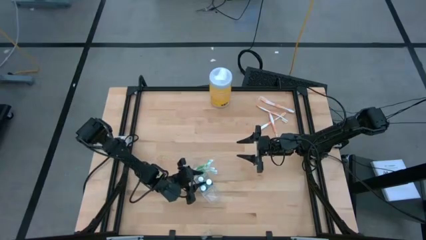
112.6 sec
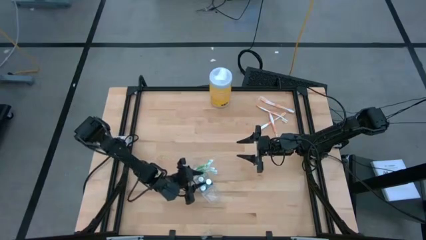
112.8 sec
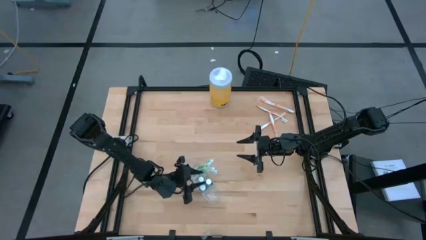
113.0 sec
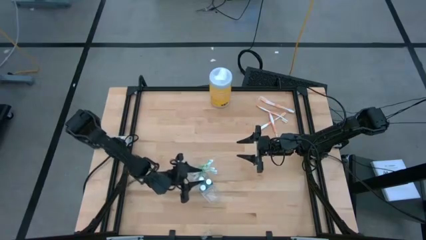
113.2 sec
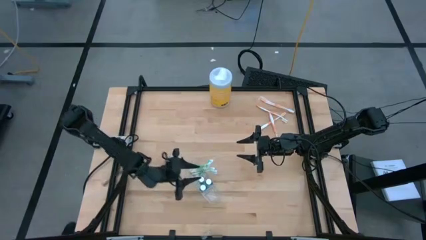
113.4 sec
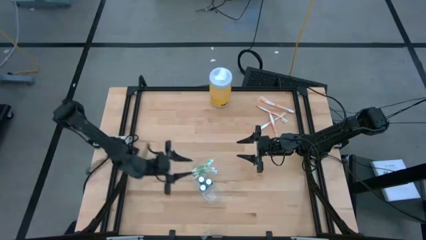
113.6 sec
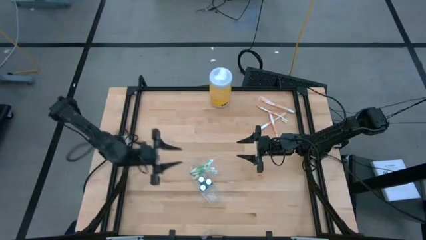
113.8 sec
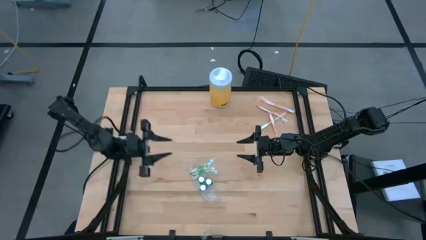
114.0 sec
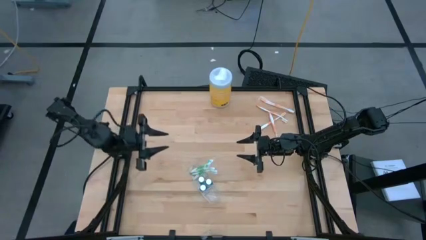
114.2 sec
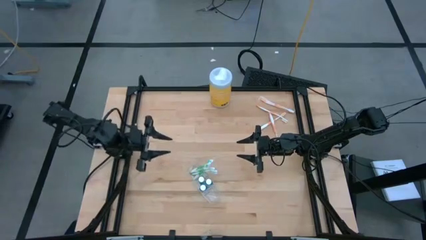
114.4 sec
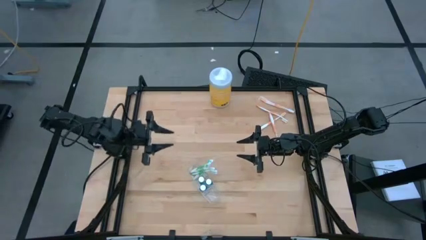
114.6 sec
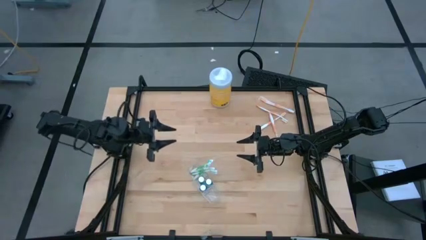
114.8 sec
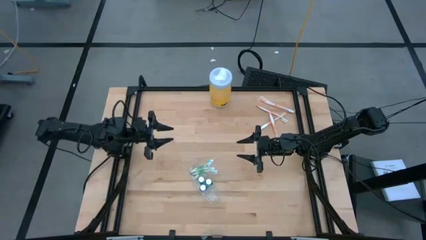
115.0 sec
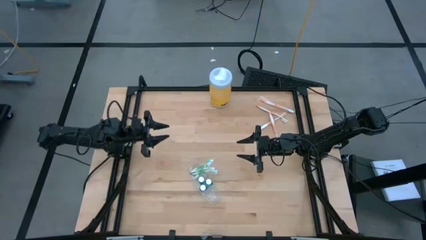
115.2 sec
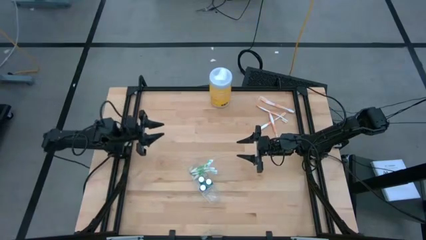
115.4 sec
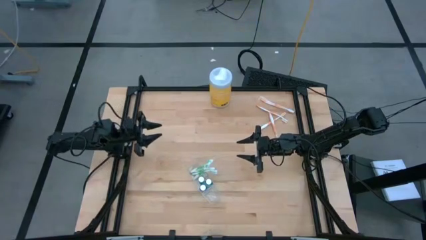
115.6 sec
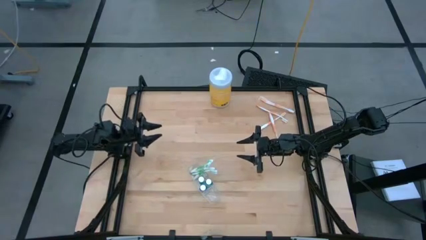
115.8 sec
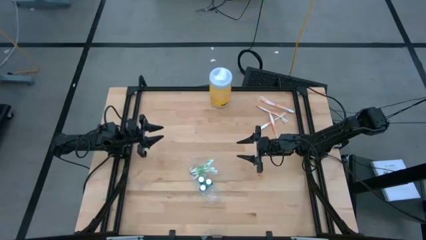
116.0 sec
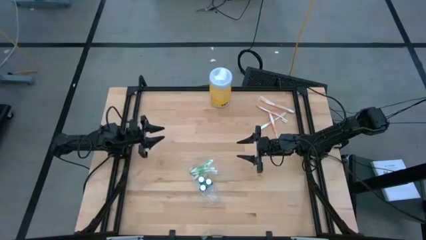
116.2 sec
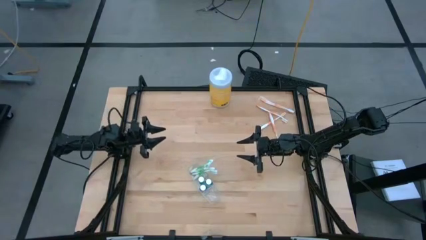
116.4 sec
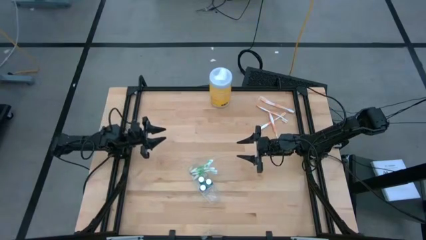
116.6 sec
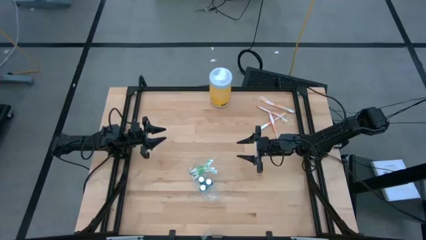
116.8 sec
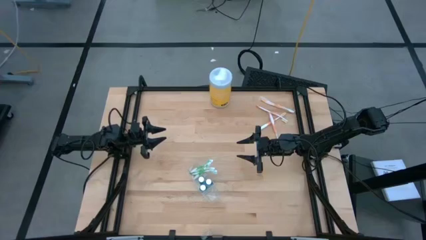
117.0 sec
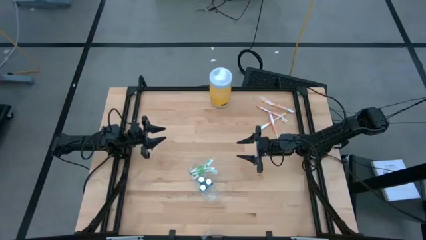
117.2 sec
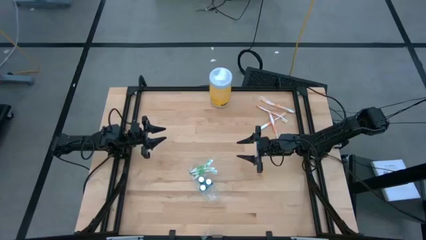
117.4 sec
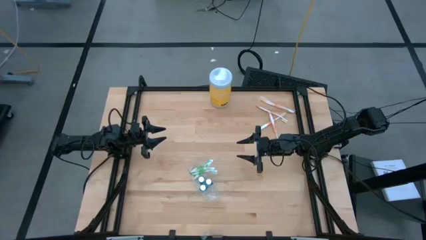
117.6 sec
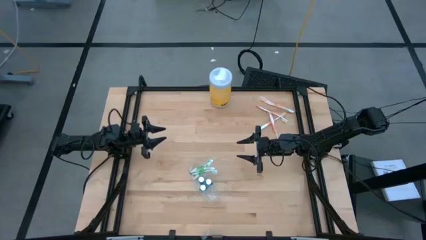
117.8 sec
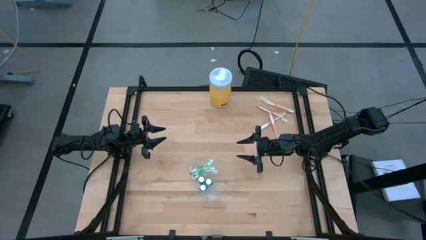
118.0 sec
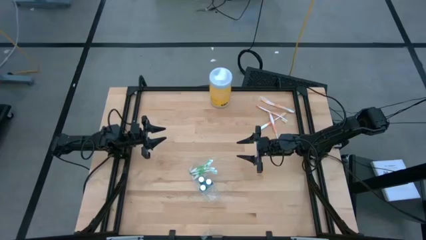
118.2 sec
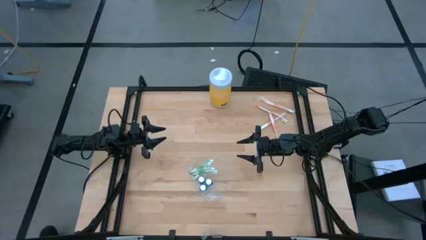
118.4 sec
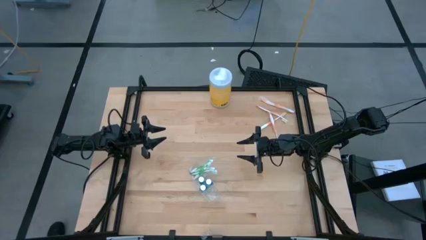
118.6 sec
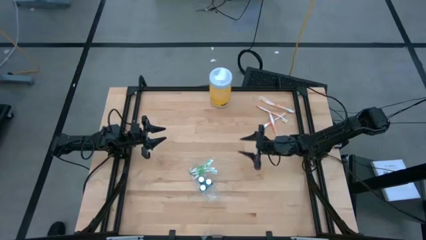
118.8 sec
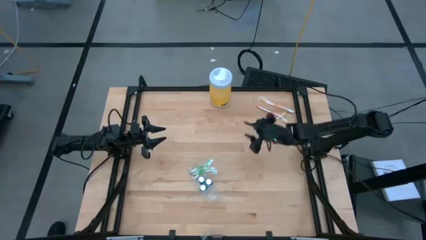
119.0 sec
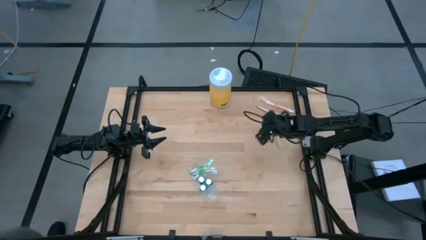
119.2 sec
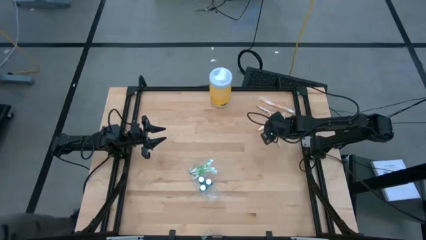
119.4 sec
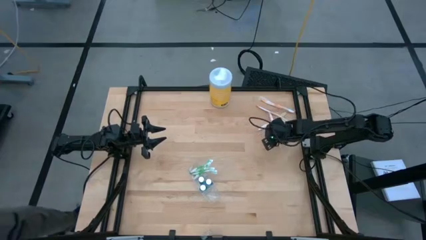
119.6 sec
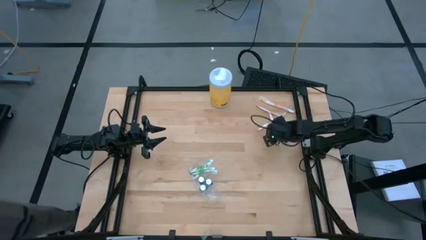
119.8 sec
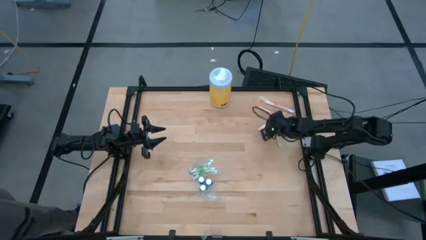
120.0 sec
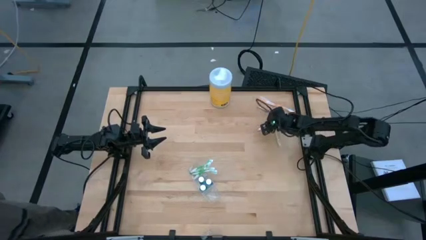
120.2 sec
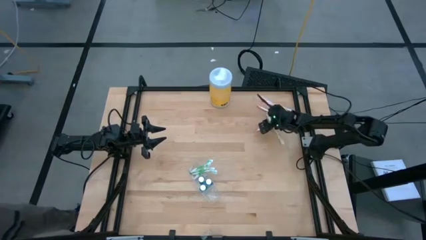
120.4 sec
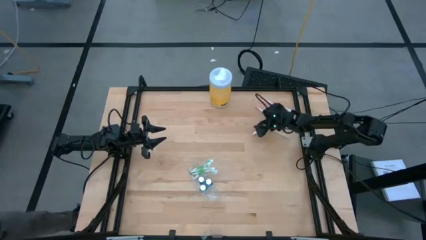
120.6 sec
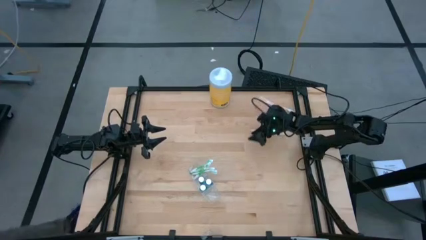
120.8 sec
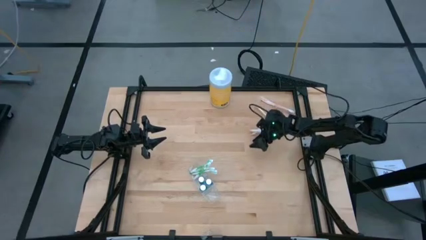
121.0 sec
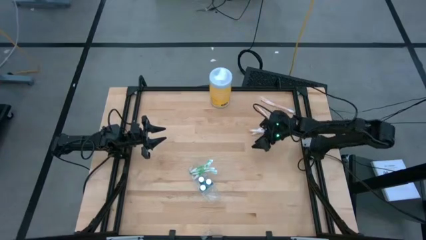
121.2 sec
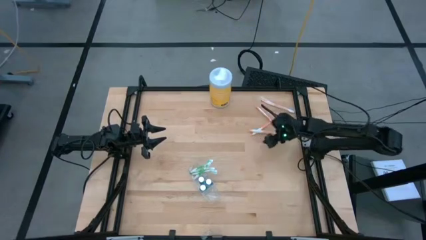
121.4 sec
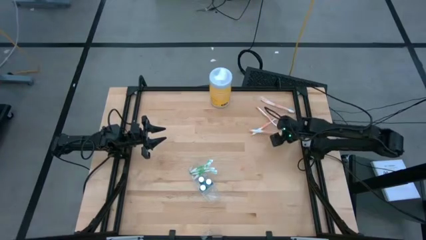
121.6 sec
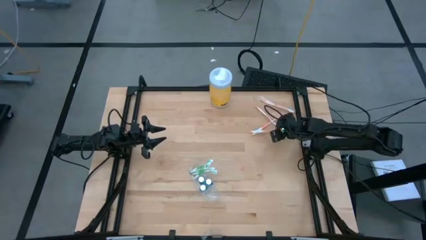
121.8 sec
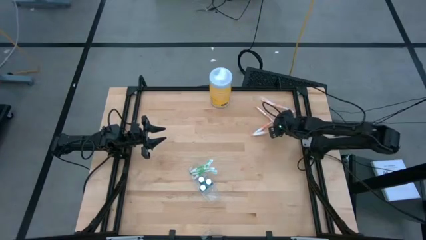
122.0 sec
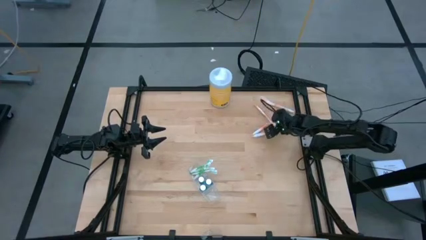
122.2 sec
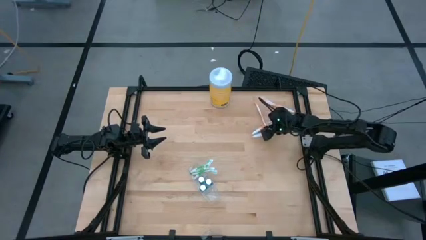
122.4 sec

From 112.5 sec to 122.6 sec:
Task: Pick & Place toothbrushing station
Put the orange toothbrush into the transparent organizer

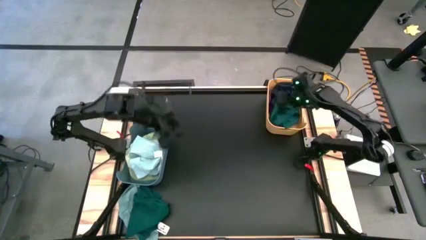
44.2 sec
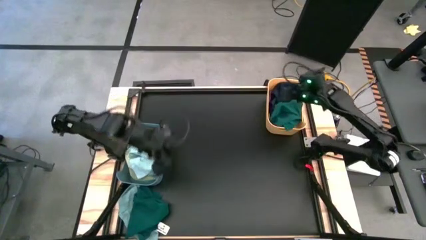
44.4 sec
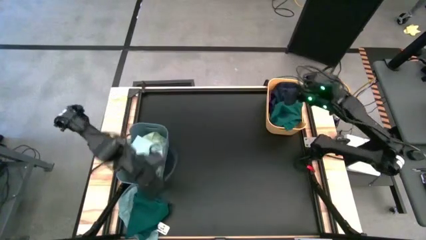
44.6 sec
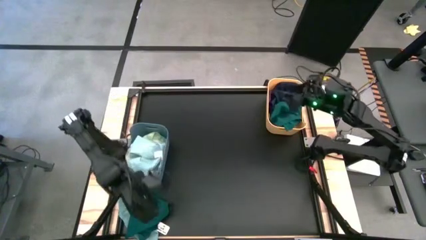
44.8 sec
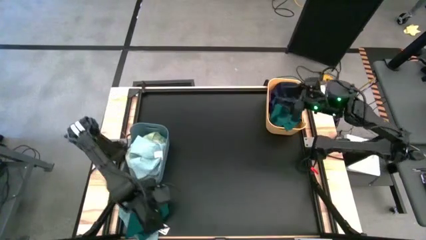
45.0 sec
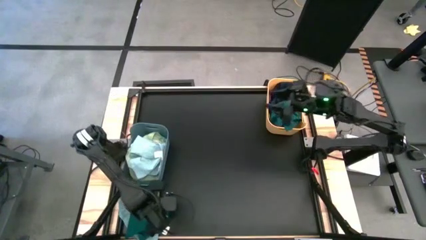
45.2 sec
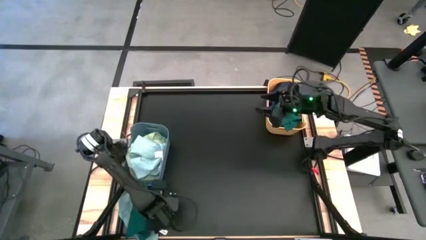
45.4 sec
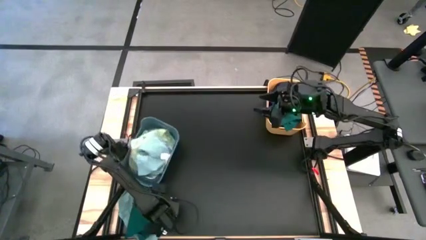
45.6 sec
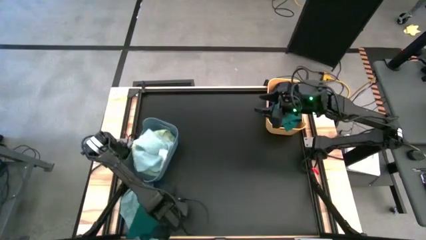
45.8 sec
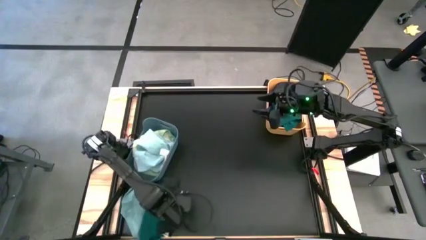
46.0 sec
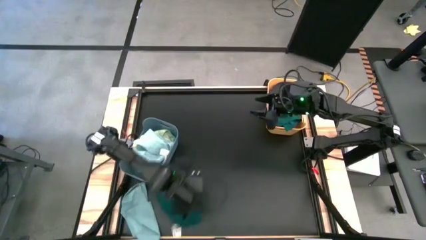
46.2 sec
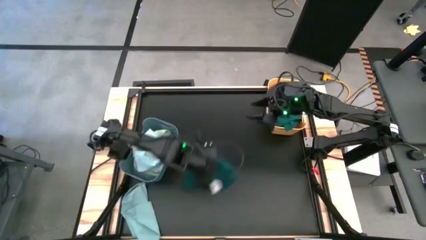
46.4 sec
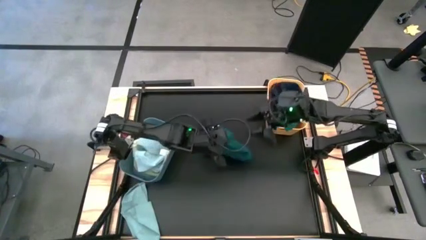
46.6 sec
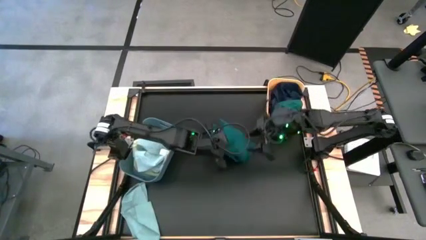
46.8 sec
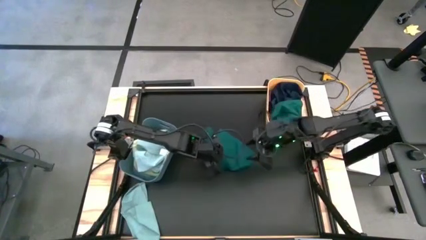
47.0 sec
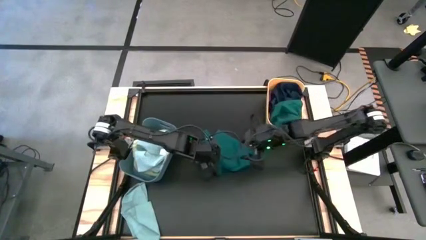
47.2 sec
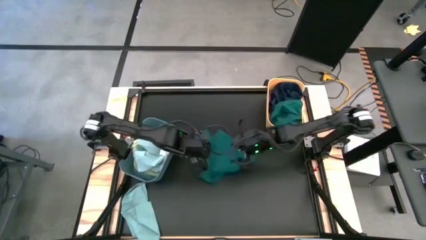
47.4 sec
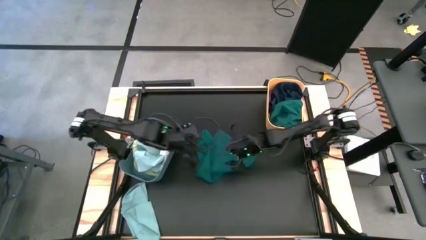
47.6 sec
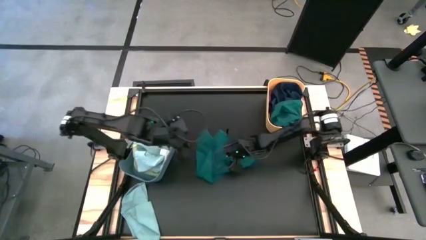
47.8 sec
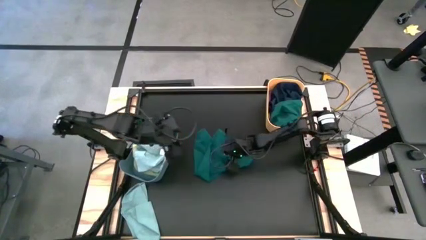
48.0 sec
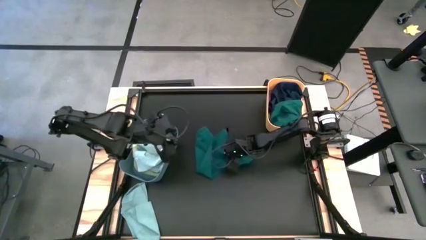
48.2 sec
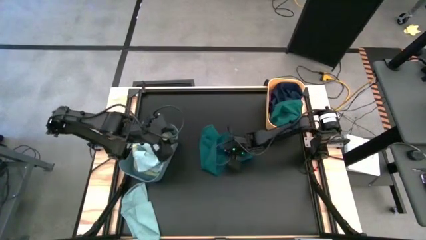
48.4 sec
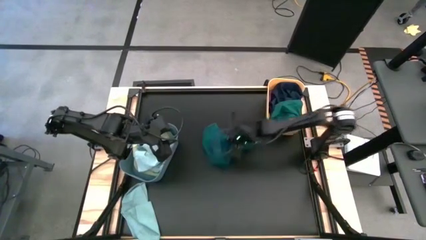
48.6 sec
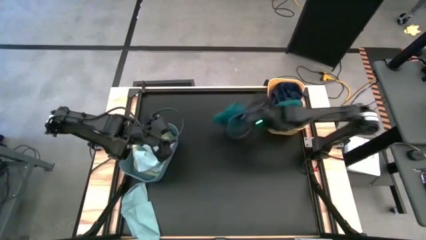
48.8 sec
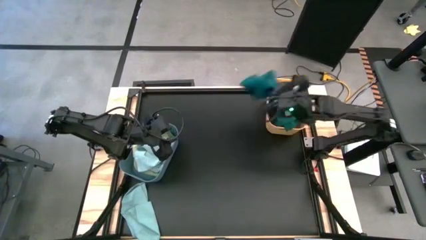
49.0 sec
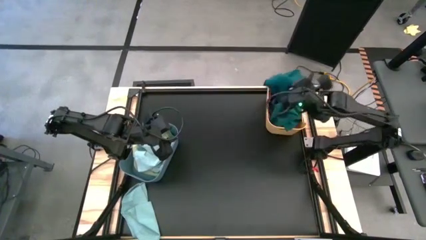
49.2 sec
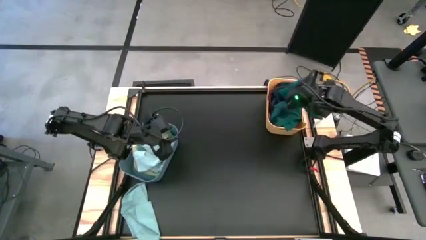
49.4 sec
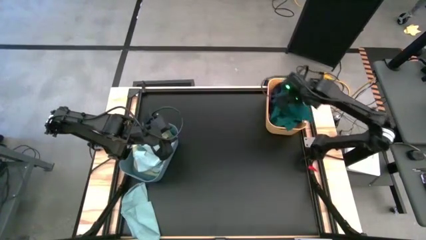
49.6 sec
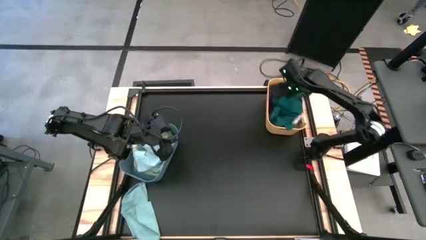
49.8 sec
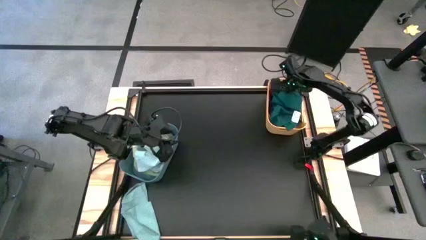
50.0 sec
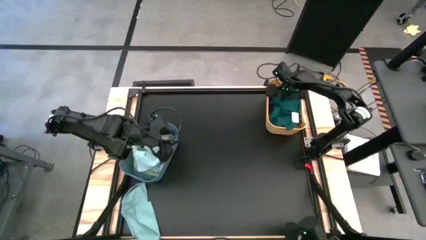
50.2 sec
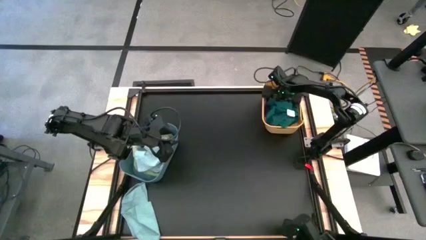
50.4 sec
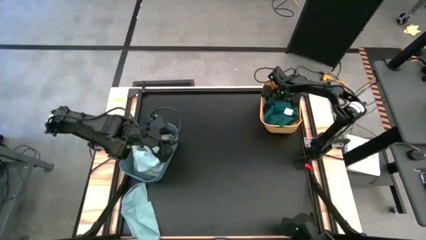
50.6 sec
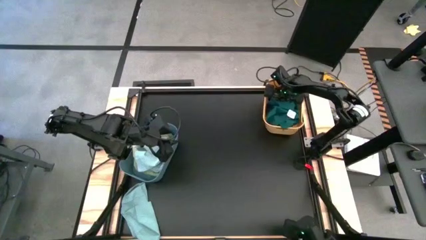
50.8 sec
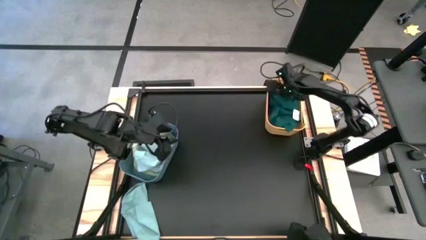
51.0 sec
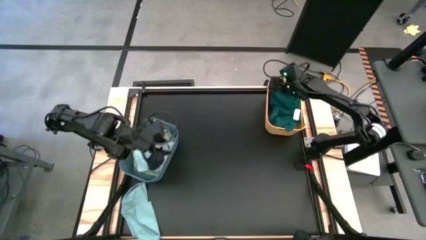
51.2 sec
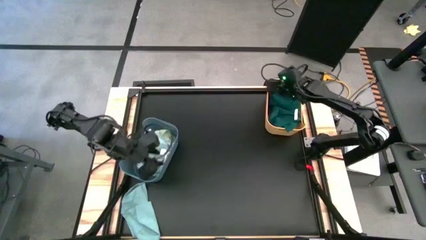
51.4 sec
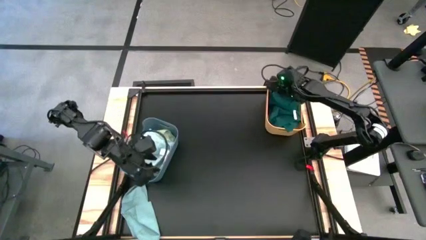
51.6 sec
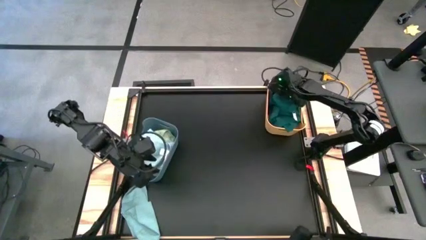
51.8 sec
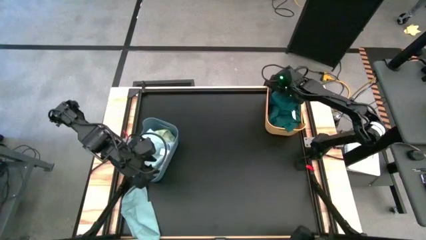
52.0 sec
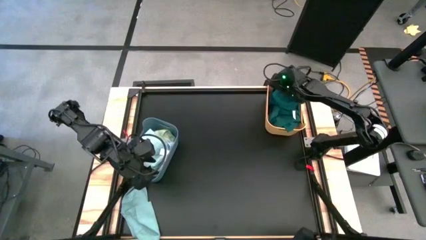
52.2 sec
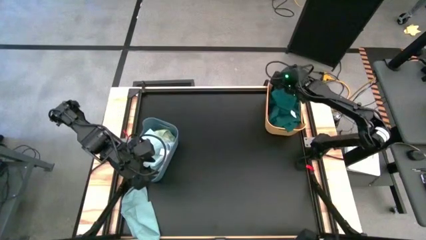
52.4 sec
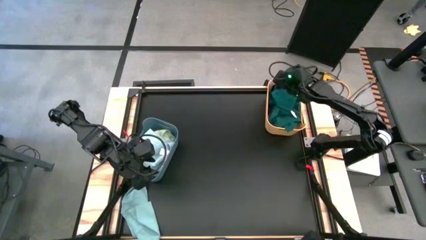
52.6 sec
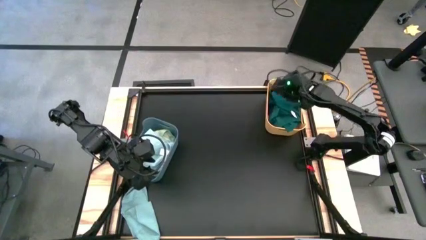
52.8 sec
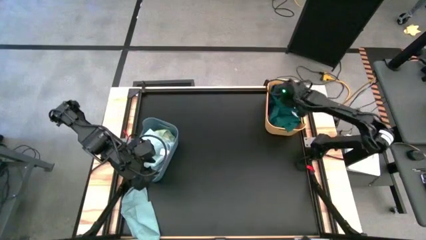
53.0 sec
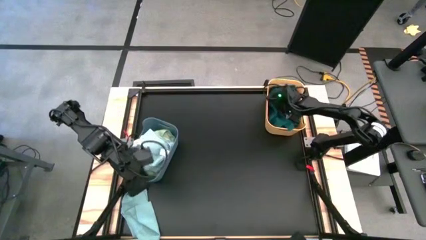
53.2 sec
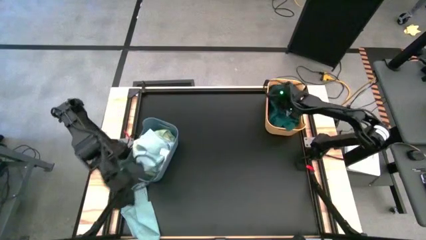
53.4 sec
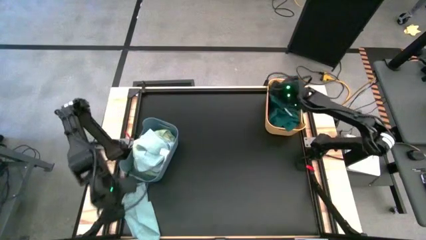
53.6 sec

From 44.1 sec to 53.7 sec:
Task: Sort towels by color in basket
Put the green towel into the orange bin
